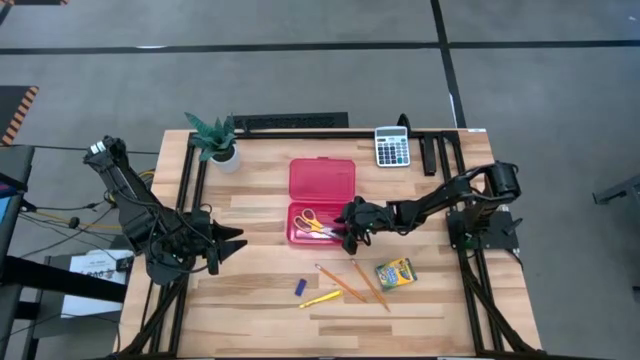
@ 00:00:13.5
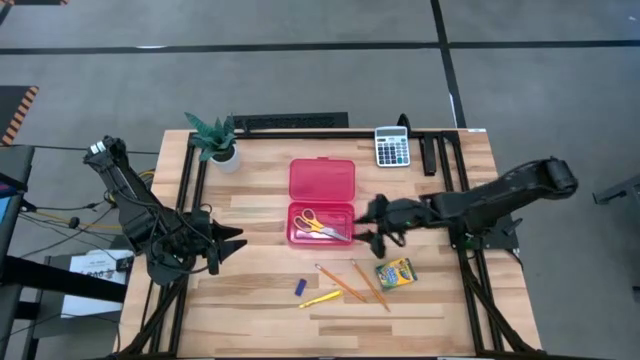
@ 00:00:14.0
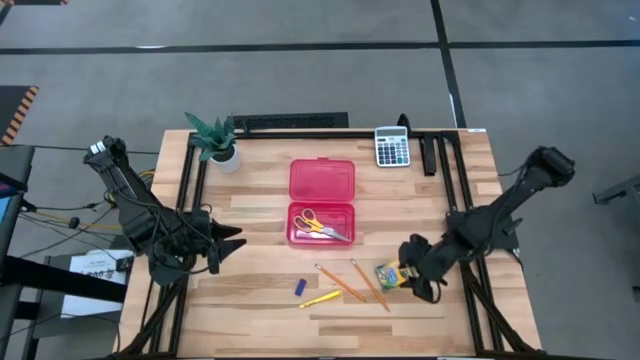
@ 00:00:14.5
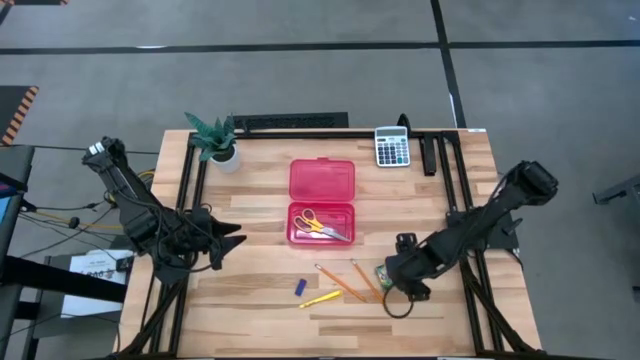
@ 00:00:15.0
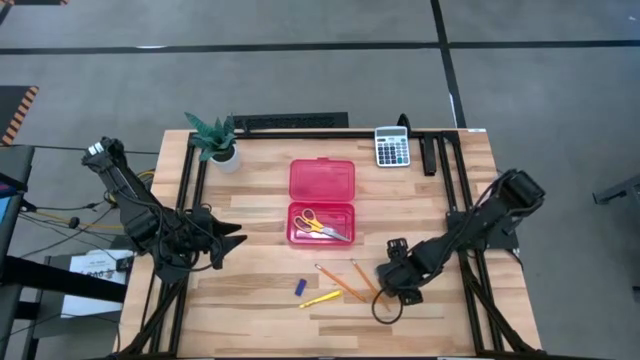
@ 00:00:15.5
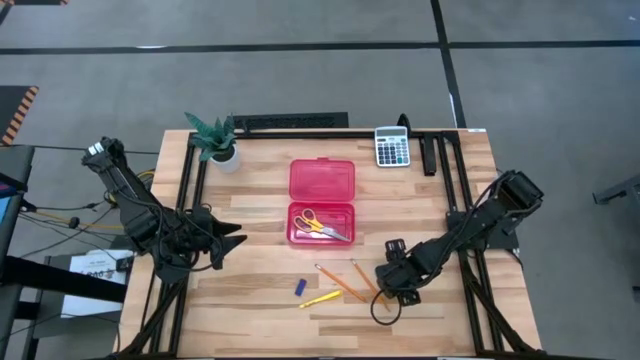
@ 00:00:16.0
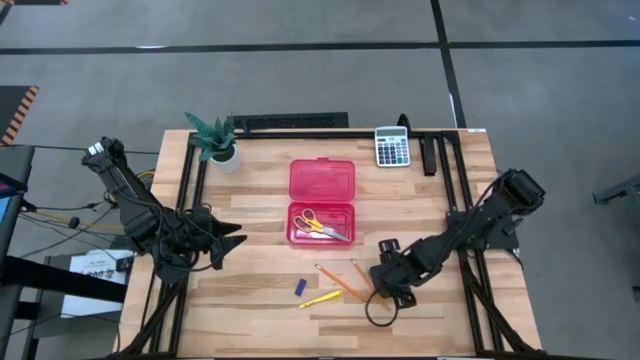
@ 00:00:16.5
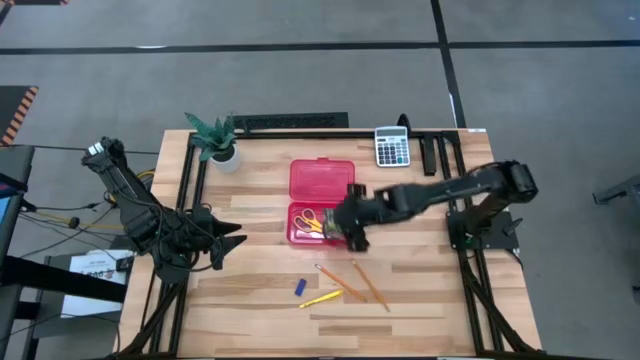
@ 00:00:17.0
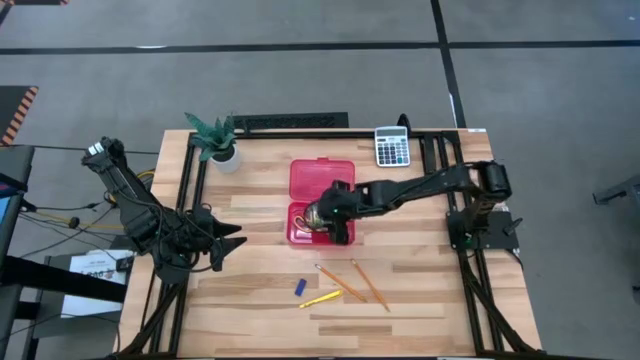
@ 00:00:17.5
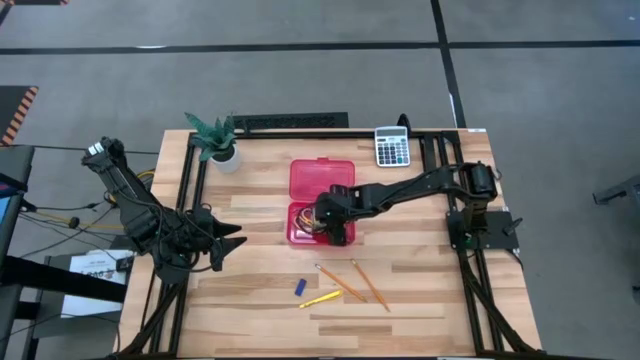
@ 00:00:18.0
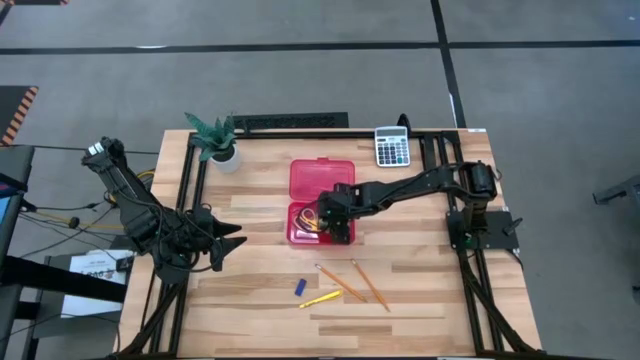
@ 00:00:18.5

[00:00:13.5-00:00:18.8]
Task: Pack school essentials
Put the box of crayons into the supply box

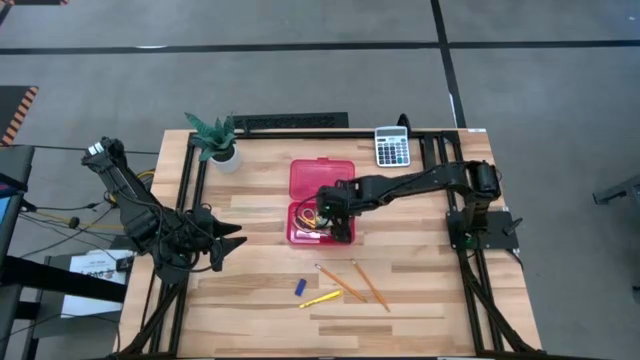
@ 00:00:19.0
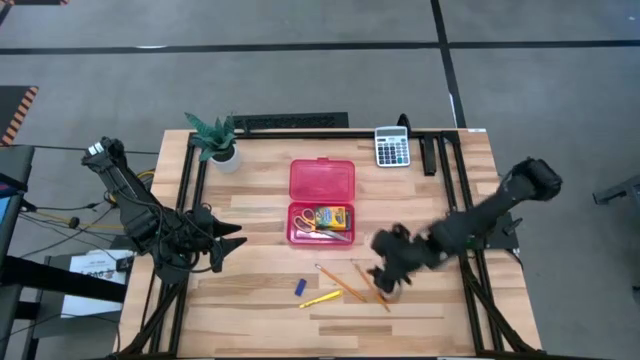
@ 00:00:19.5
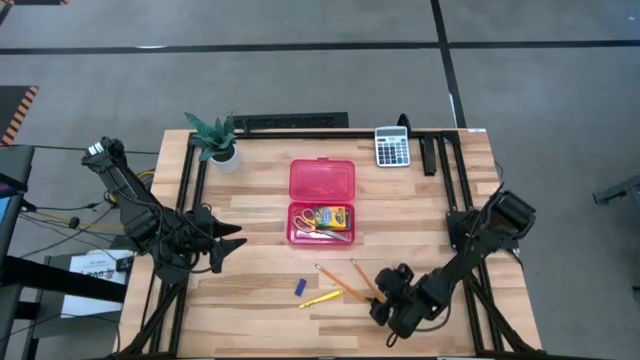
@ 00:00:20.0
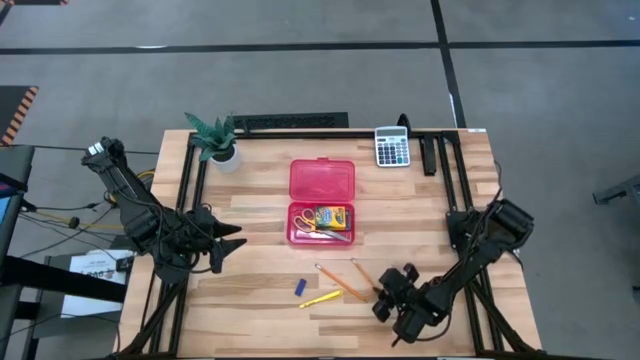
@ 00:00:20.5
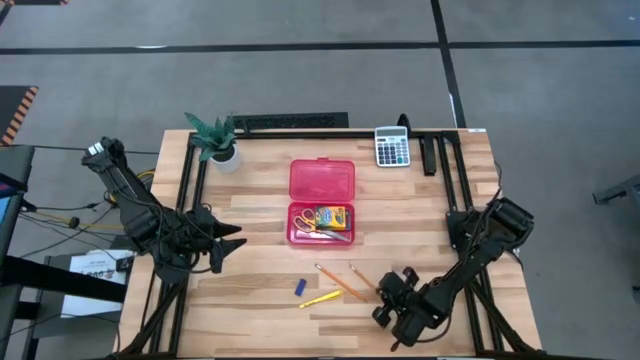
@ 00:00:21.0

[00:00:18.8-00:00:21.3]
Put the right pencil into the supply box

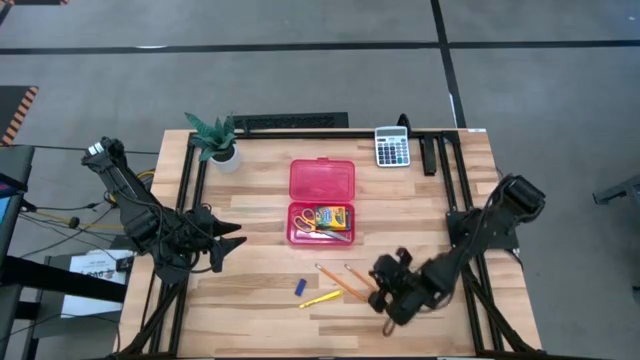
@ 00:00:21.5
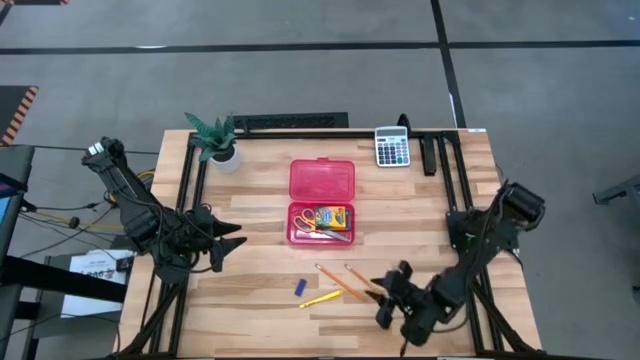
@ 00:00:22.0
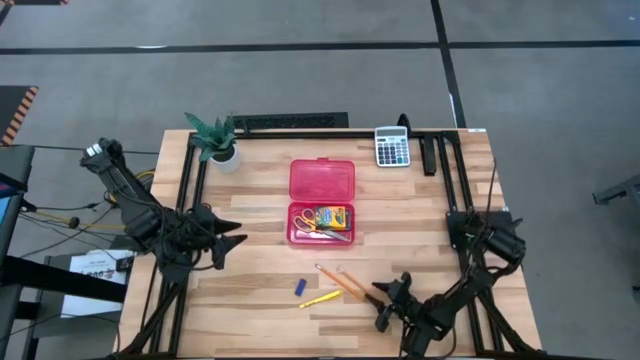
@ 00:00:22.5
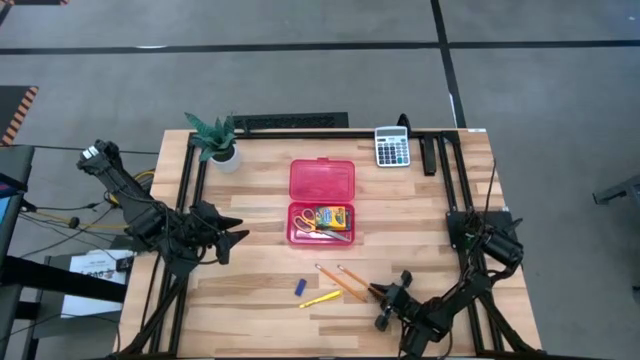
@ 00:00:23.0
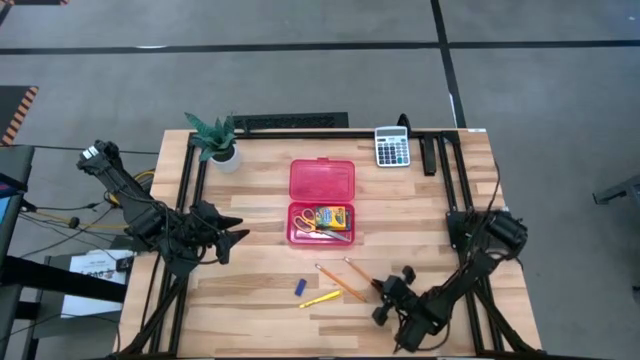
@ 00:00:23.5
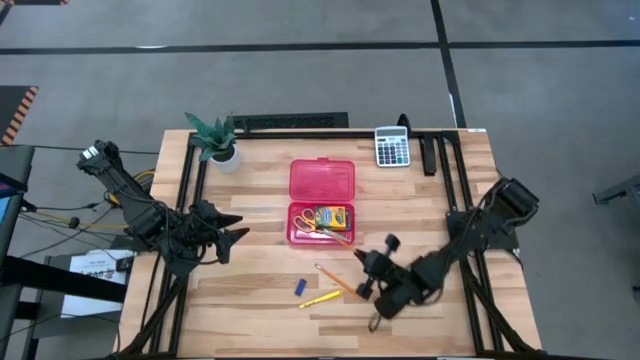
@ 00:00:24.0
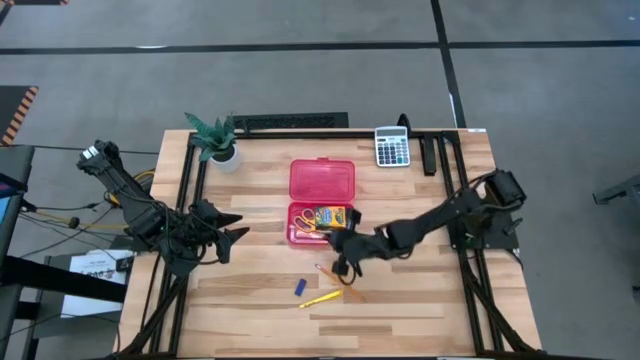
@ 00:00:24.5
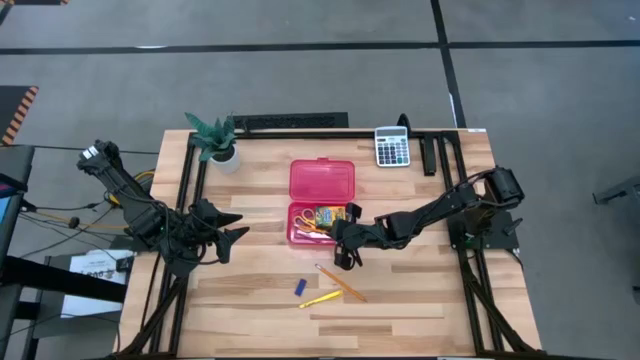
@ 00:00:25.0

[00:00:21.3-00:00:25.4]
Put the right pencil into the supply box

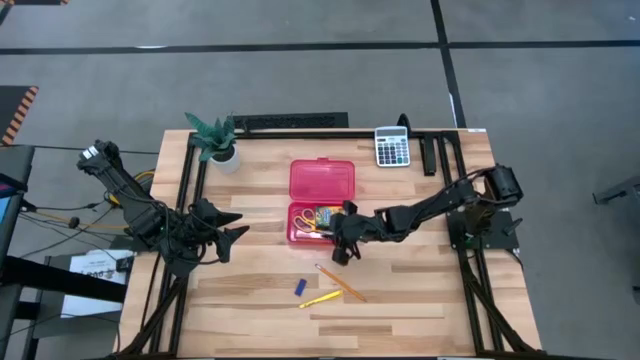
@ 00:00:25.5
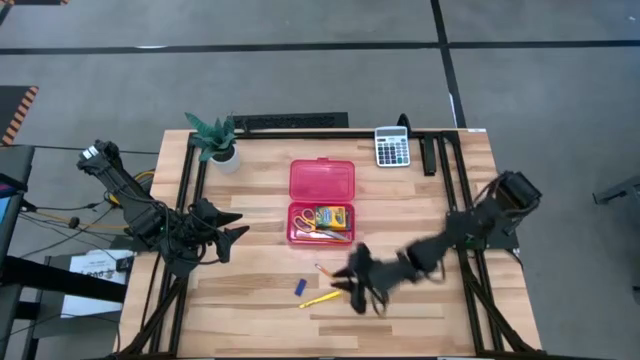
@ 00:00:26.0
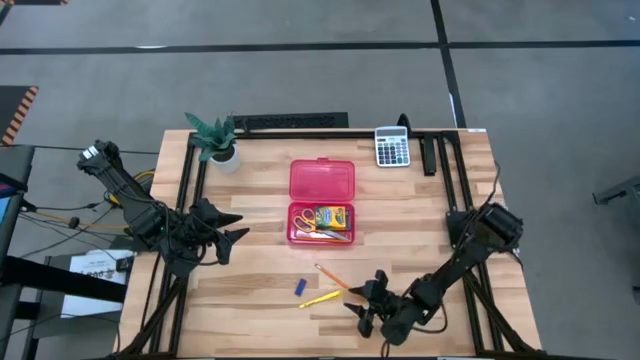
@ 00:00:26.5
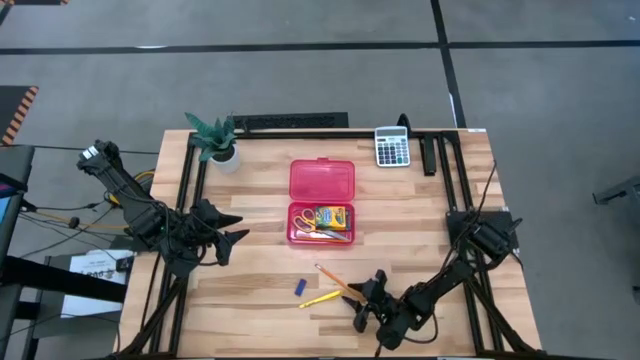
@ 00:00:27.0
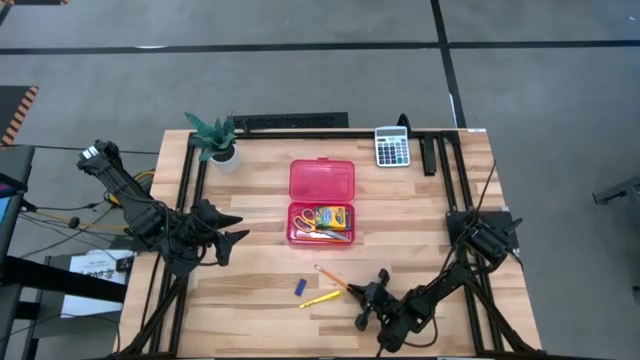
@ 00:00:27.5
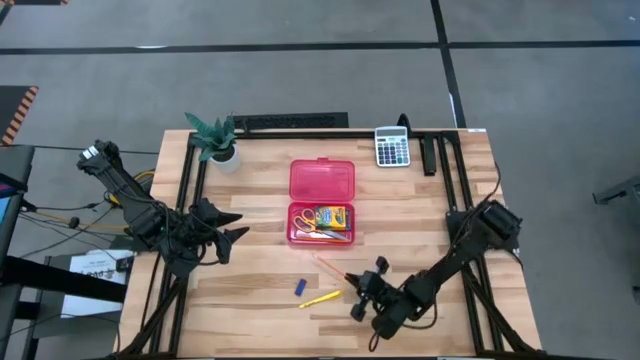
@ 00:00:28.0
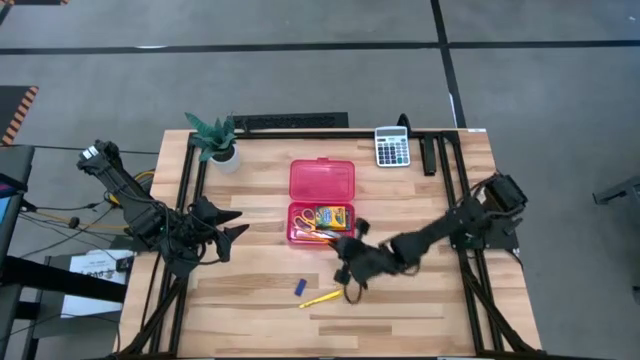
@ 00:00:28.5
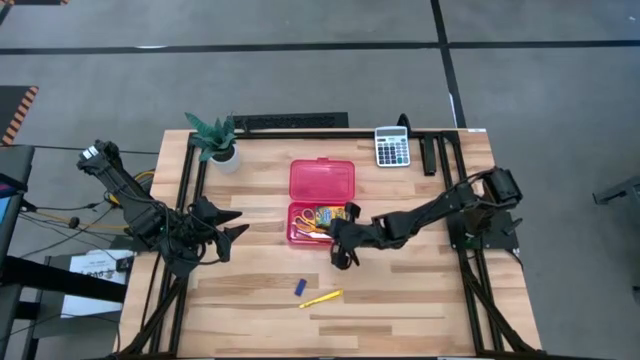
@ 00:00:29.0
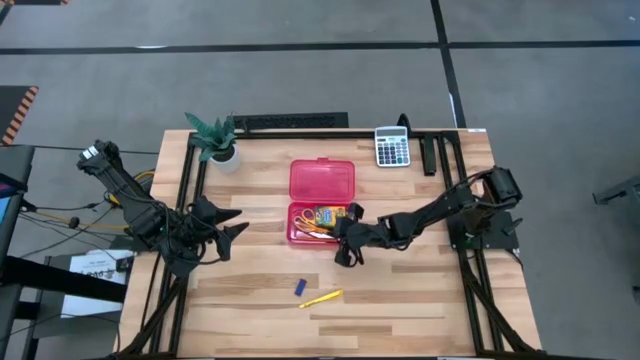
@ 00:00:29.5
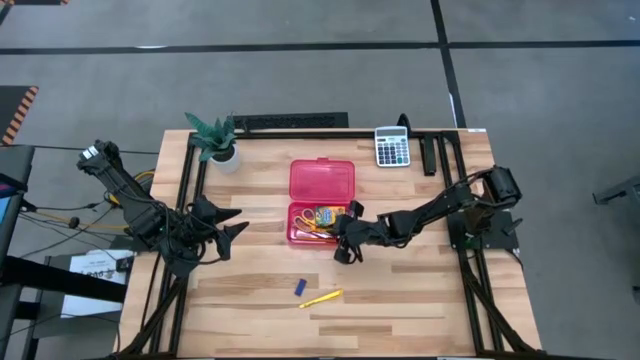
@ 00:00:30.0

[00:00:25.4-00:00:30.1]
Put the pencil into the supply box

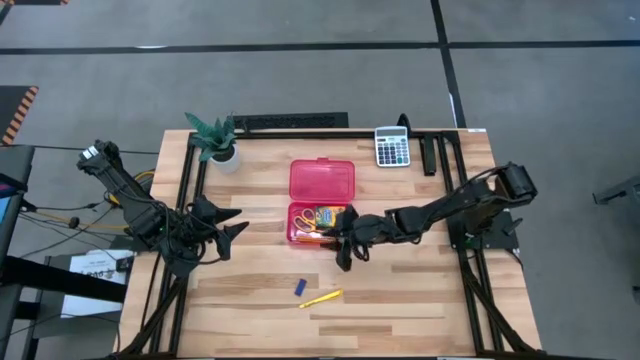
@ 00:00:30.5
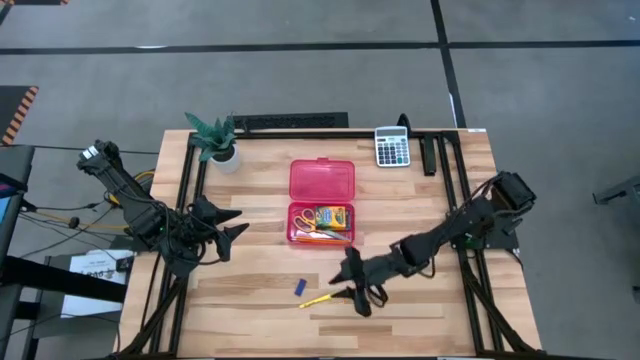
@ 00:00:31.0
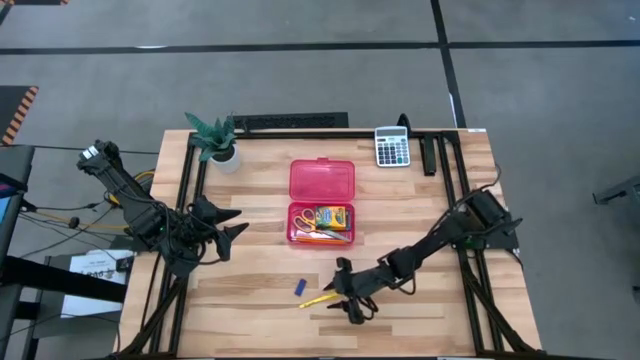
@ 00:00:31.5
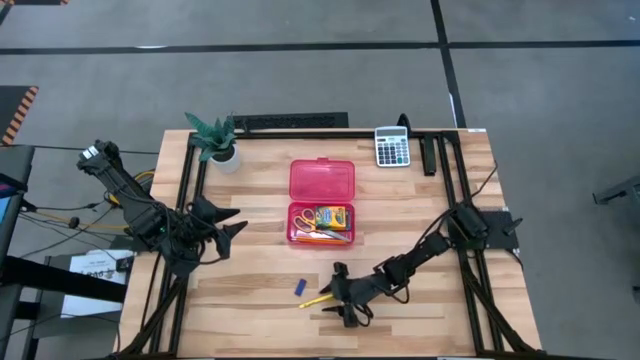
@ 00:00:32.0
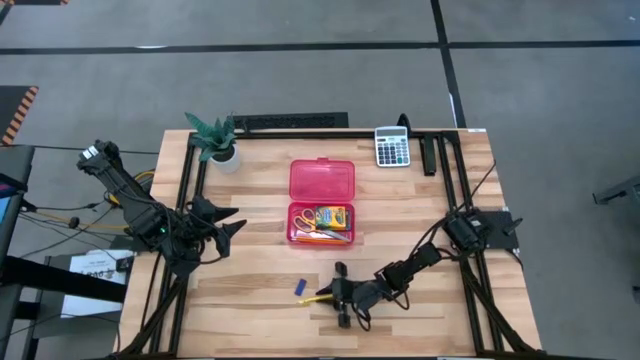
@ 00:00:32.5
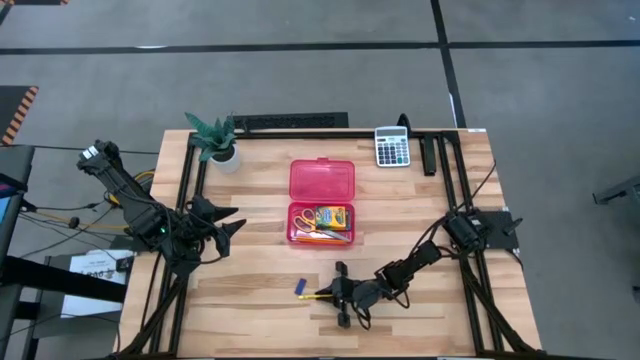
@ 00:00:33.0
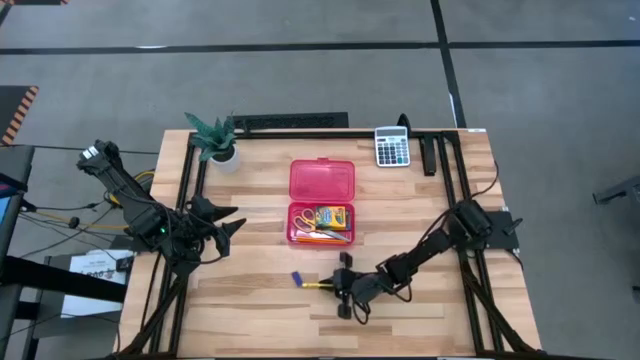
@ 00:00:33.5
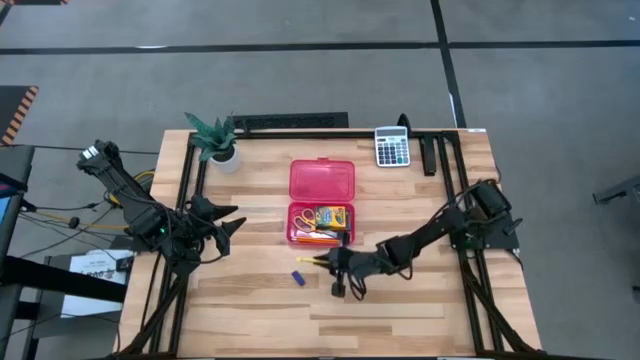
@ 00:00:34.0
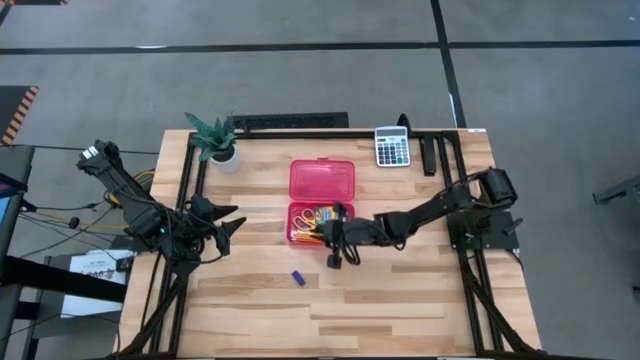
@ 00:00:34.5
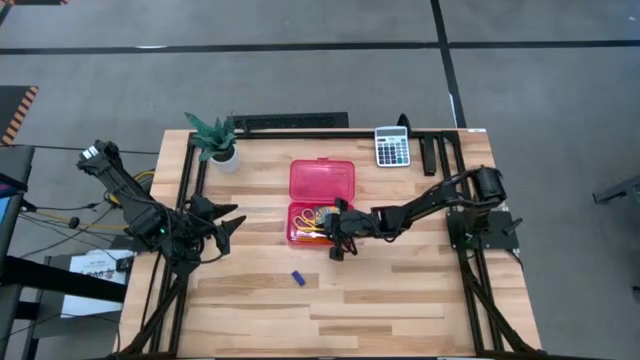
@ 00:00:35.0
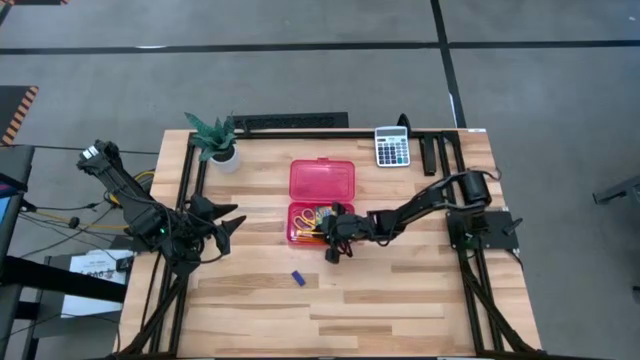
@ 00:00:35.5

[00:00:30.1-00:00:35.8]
Put the pen into the supply box
